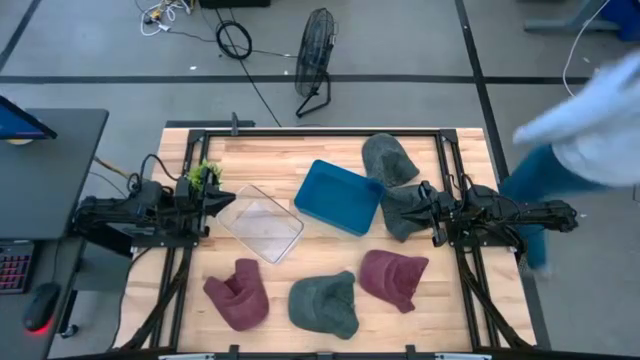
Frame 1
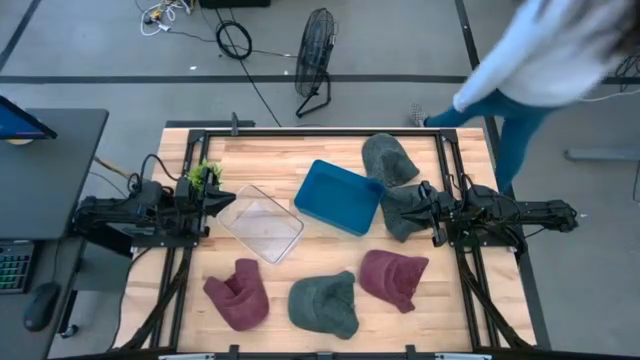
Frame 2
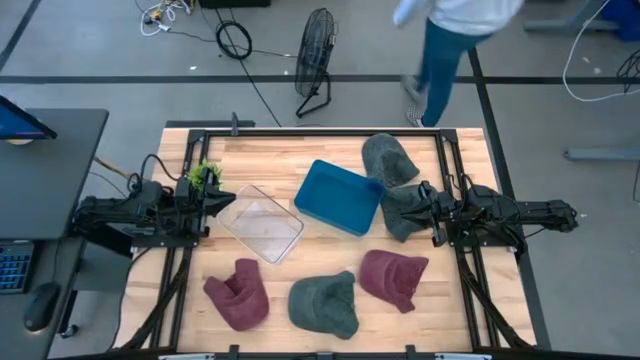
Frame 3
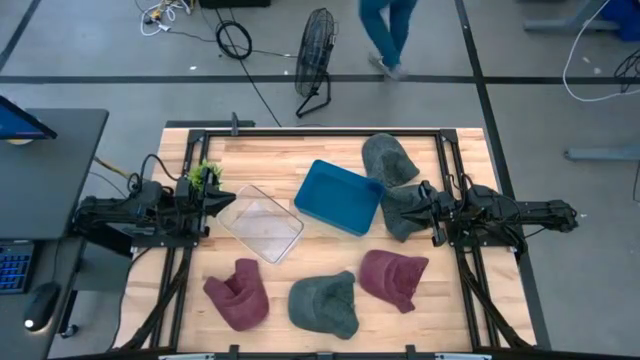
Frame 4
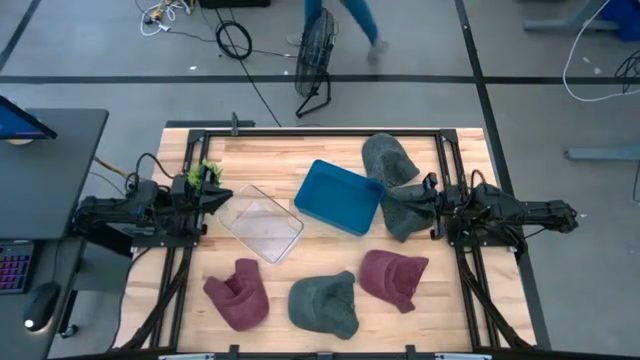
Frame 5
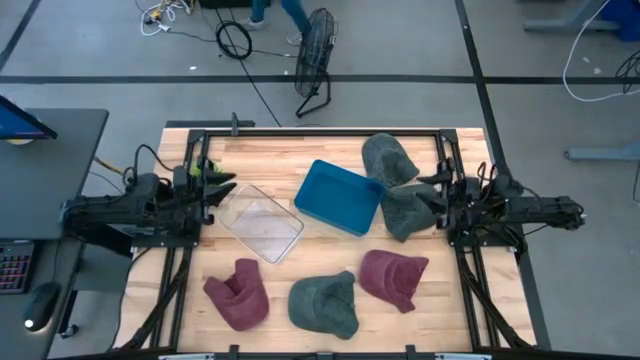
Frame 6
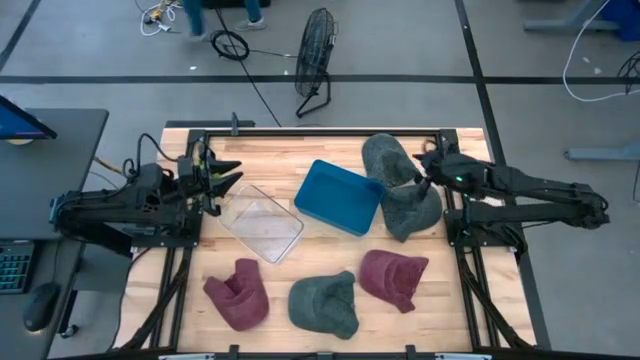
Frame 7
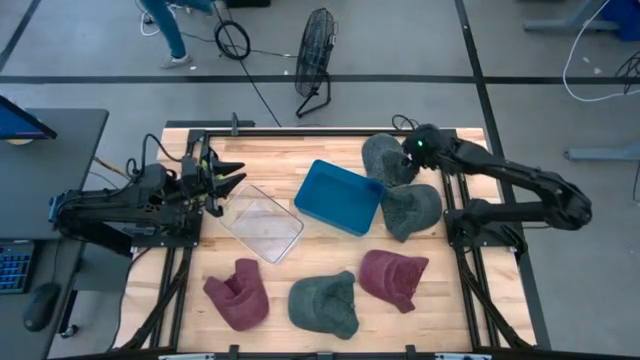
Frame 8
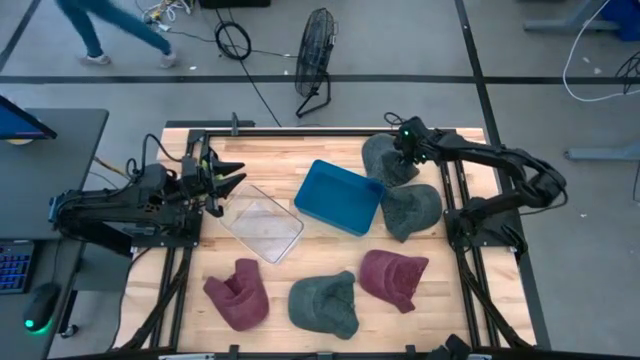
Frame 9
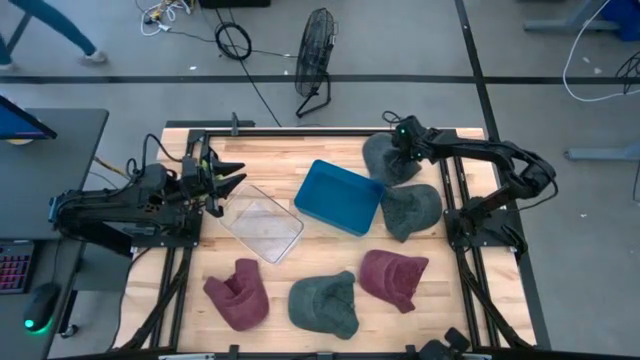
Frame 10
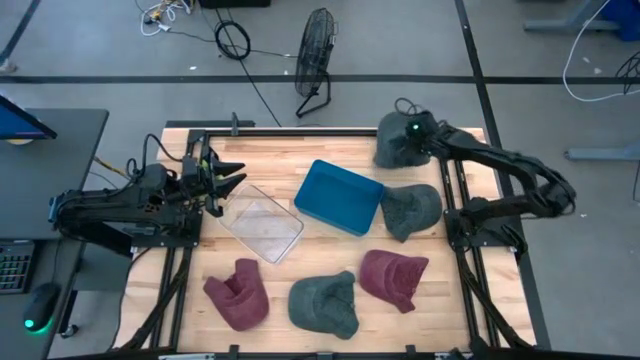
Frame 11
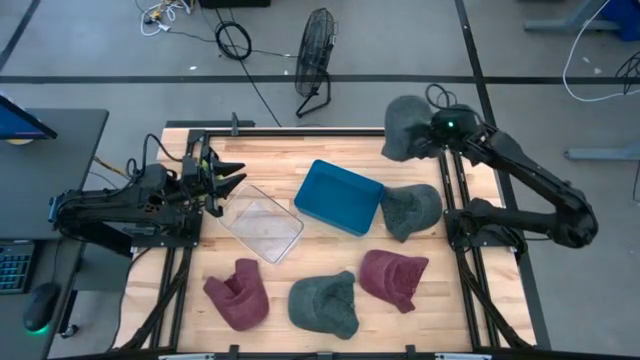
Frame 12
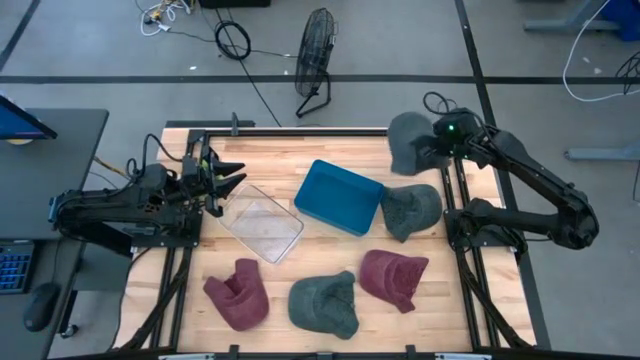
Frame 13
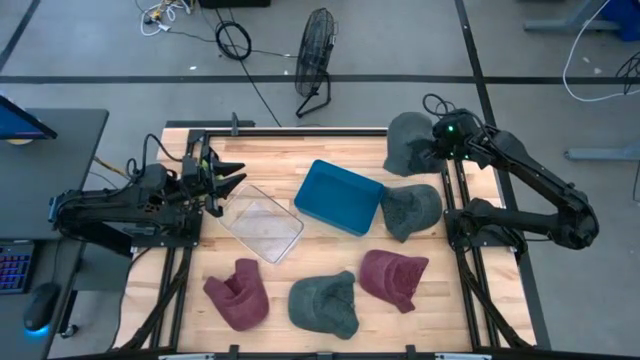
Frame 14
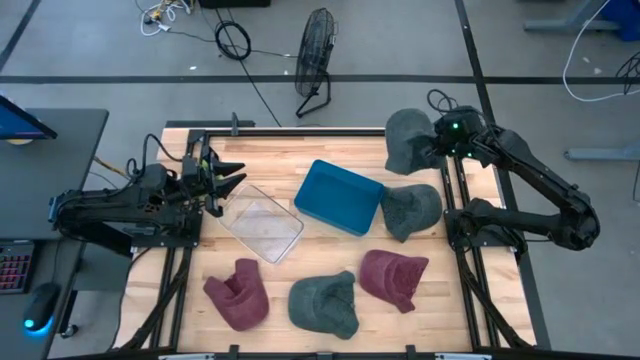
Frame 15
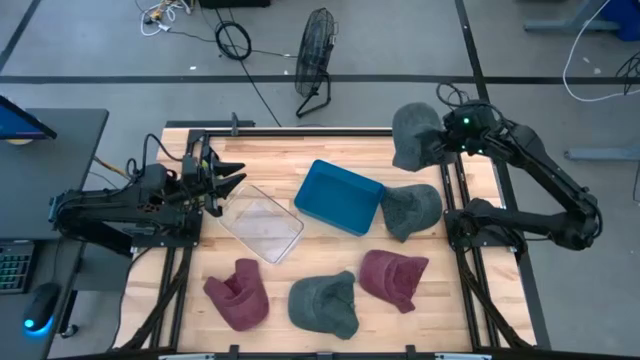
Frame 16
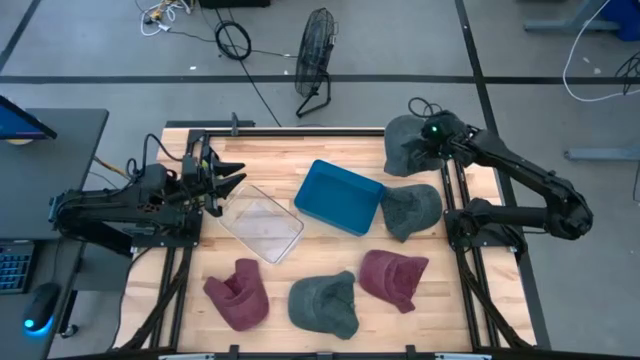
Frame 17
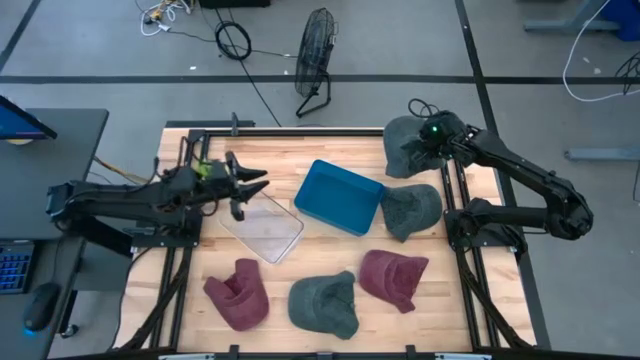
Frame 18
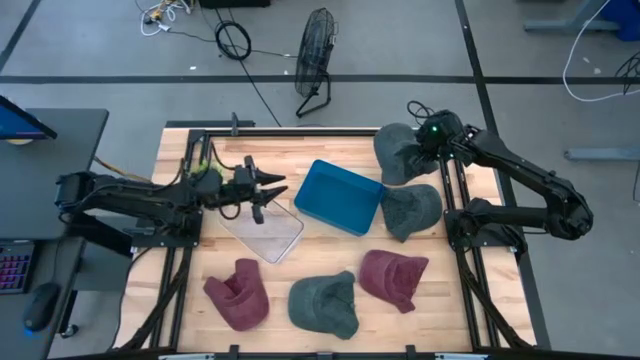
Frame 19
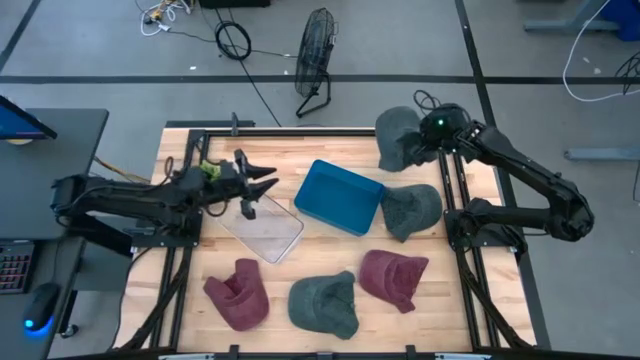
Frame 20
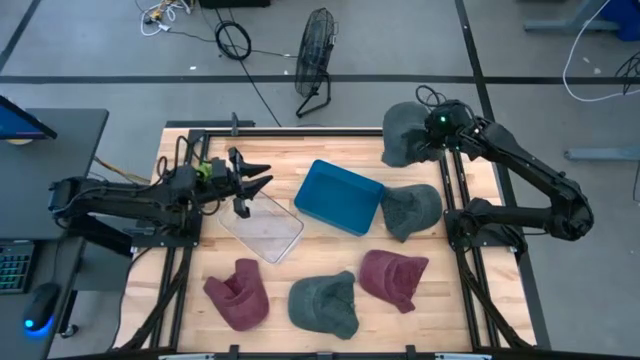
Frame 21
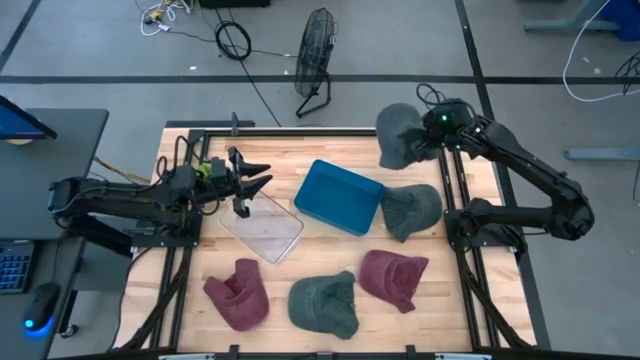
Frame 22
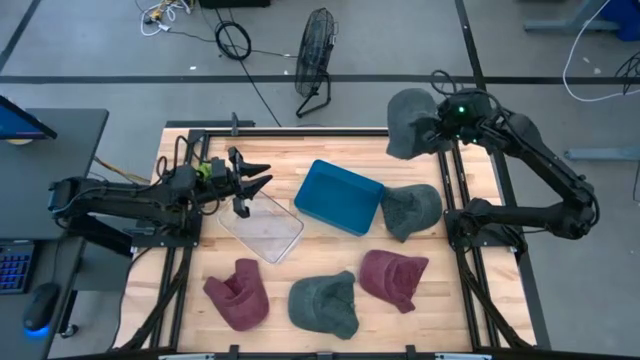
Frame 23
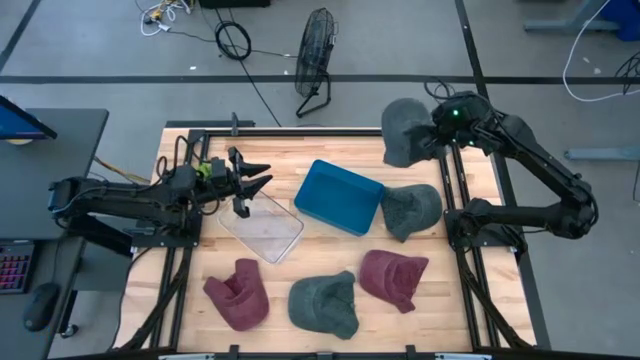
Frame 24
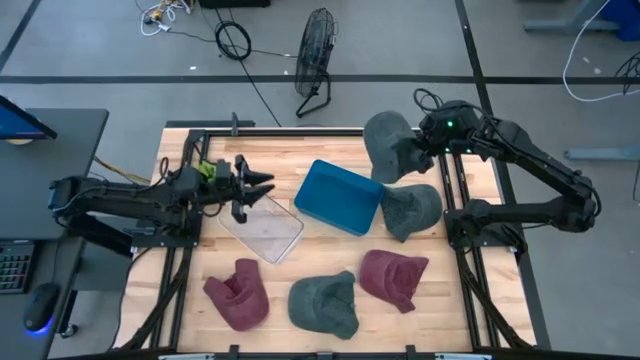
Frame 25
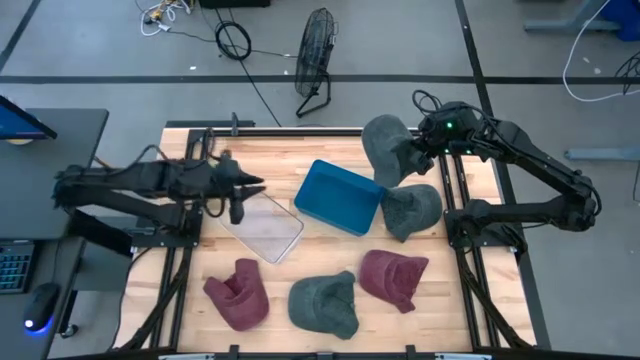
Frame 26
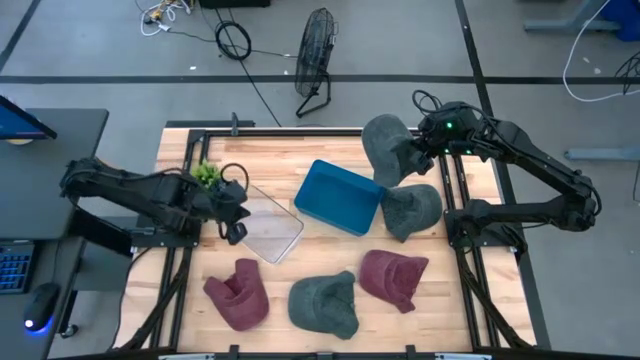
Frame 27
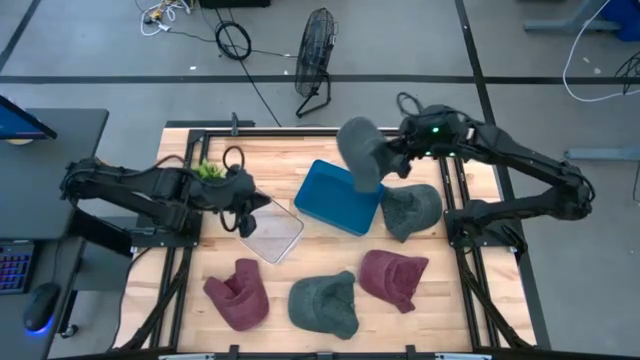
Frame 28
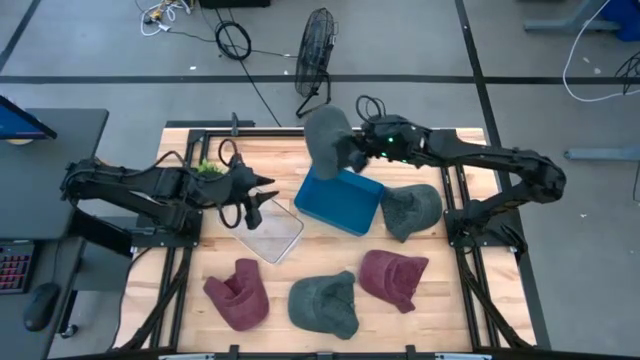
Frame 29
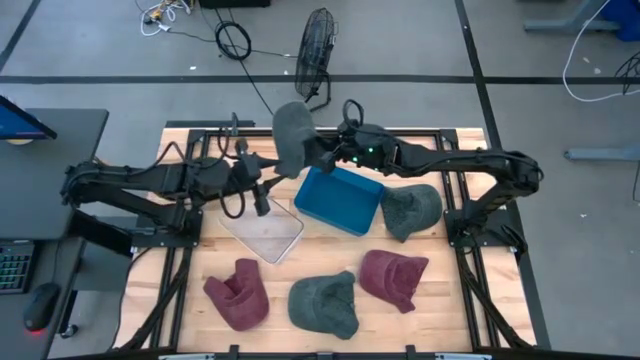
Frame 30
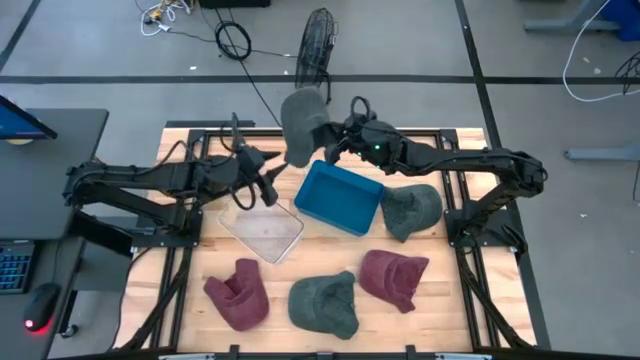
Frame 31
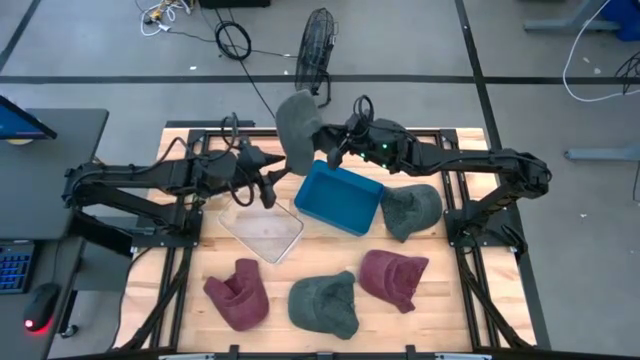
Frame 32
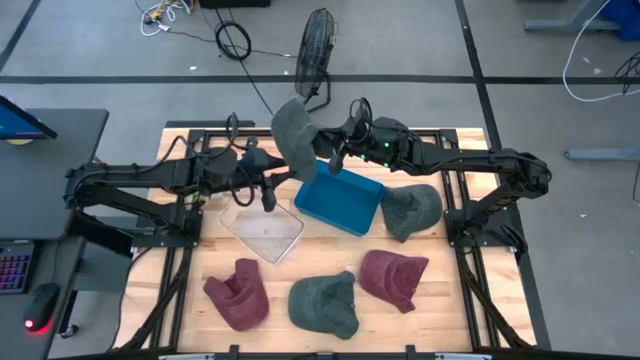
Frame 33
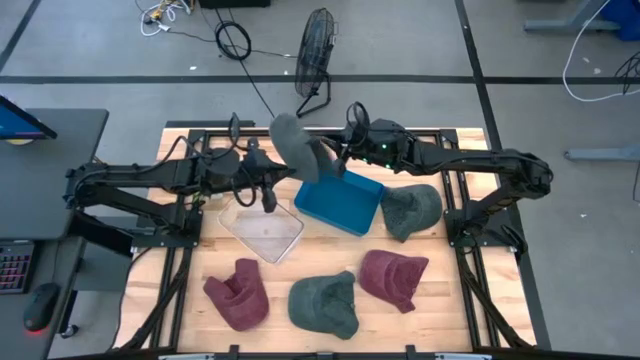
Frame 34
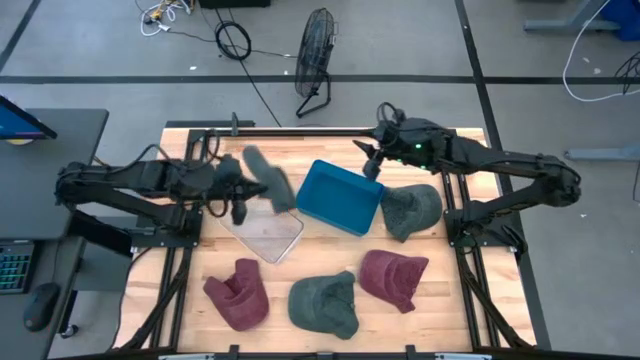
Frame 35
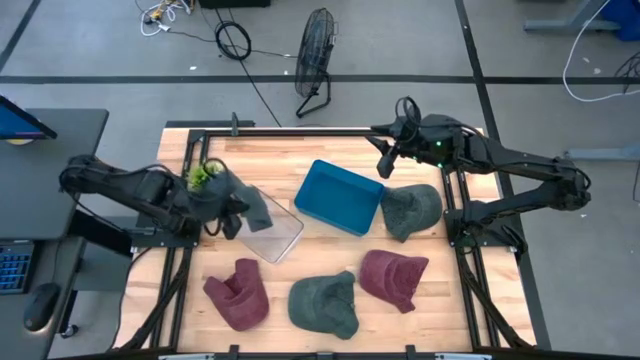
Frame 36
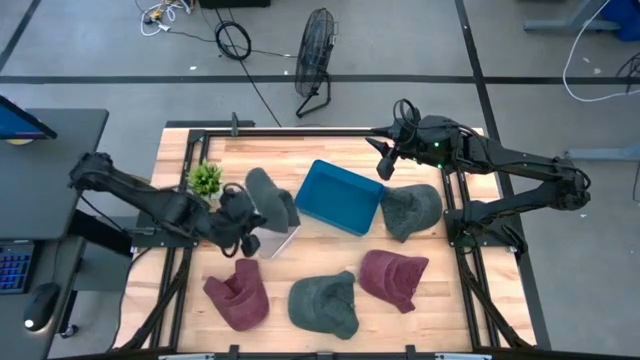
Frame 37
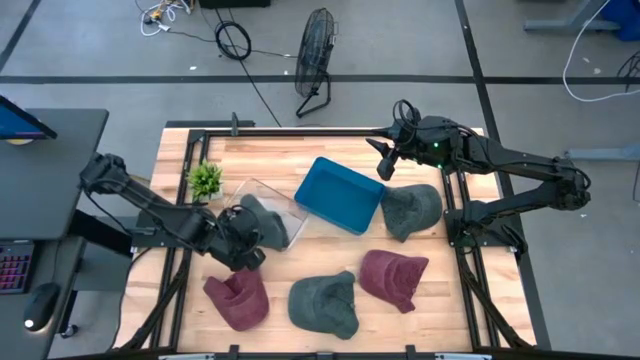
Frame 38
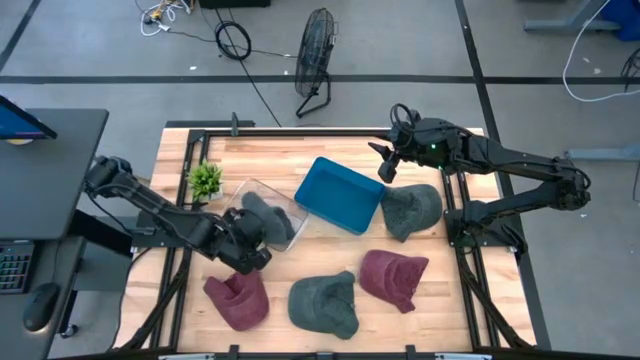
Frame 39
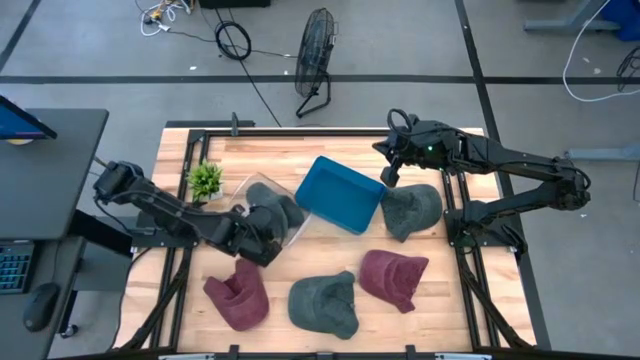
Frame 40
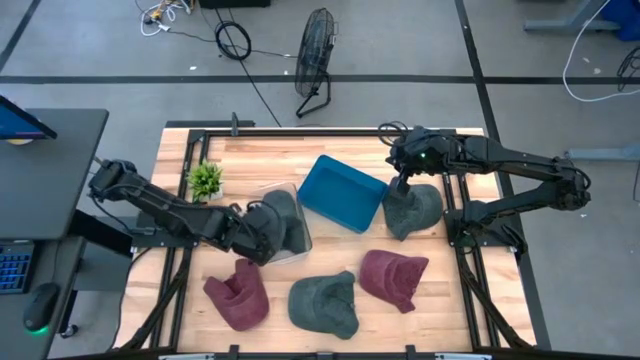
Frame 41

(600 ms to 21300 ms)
Task: Pick & Place hat
Put the top gray cap into the transparent bin
